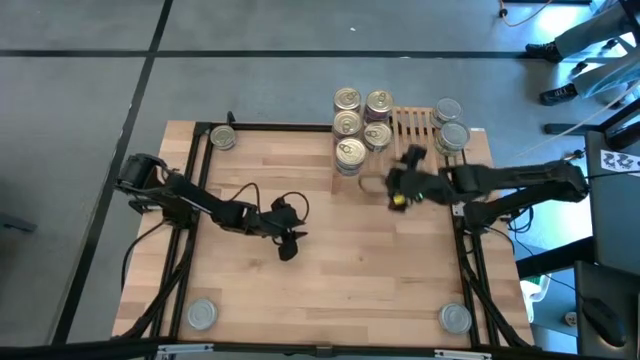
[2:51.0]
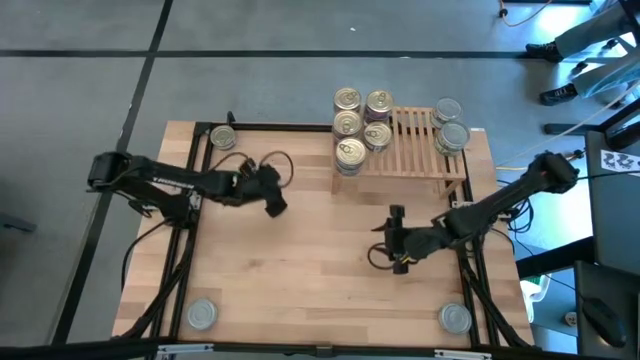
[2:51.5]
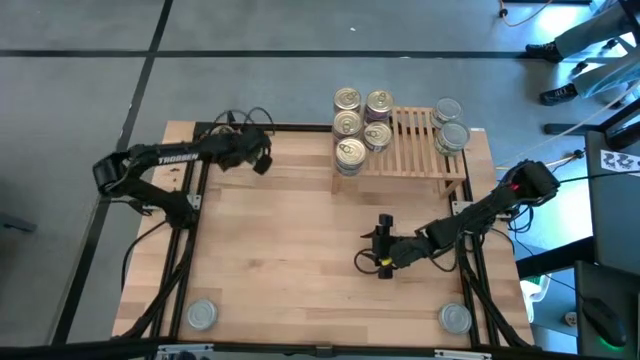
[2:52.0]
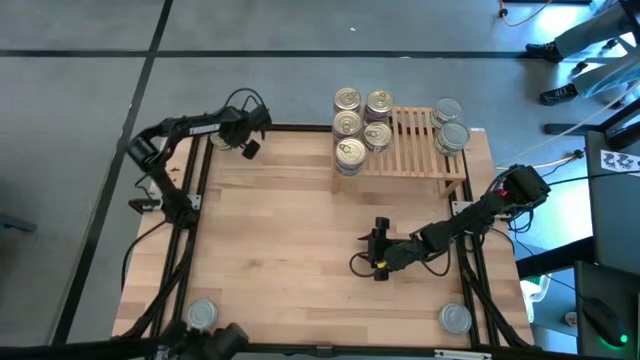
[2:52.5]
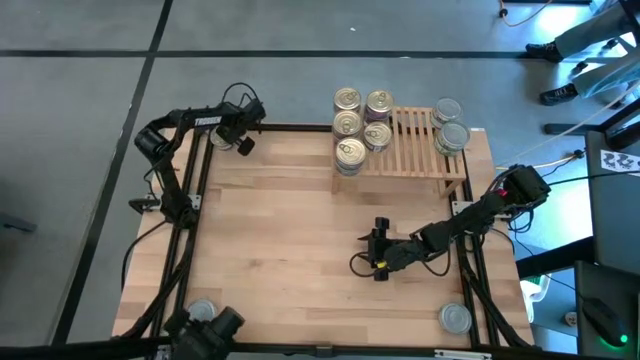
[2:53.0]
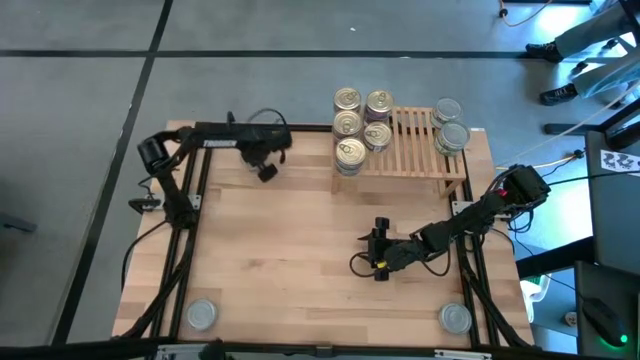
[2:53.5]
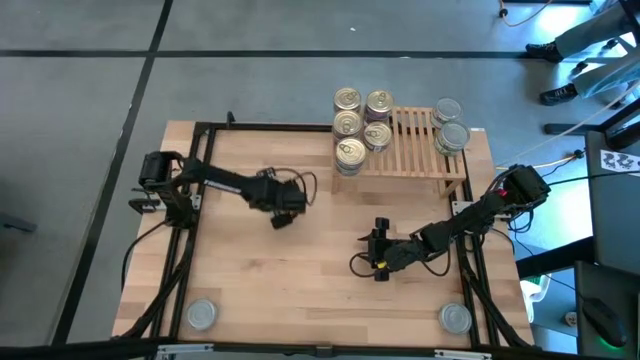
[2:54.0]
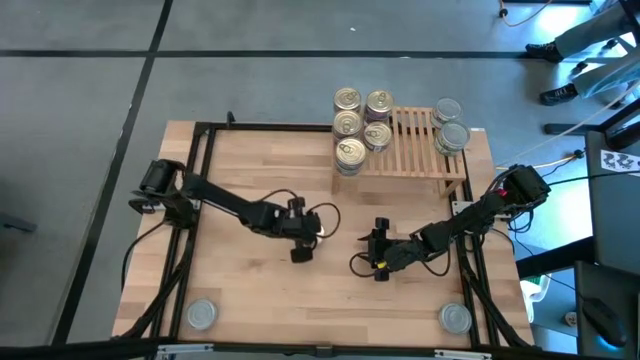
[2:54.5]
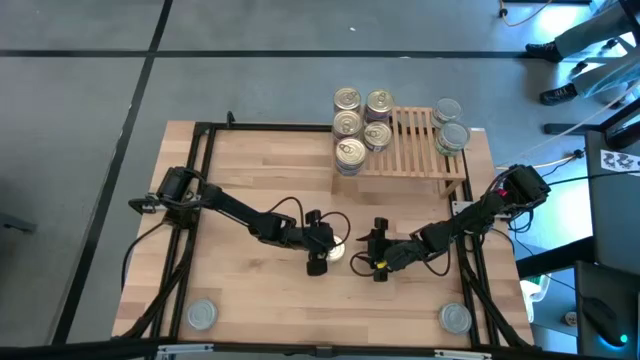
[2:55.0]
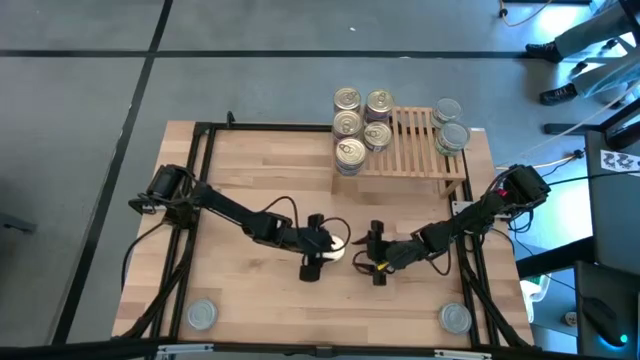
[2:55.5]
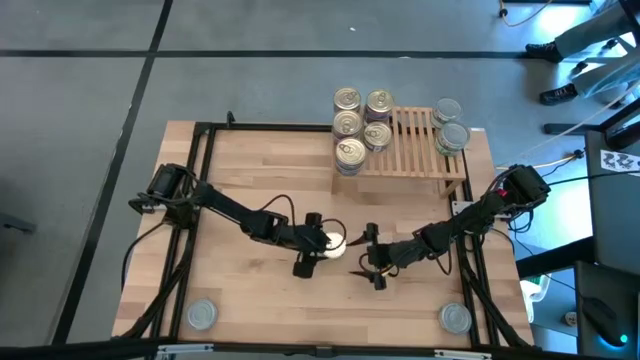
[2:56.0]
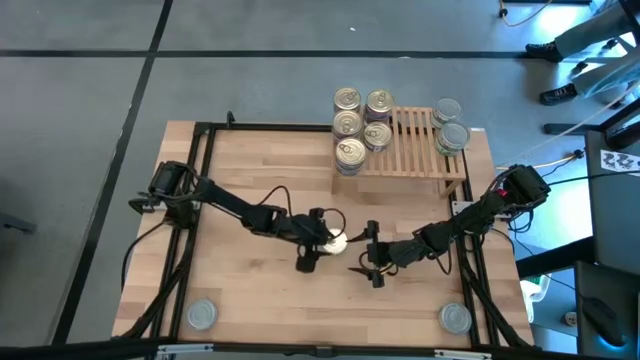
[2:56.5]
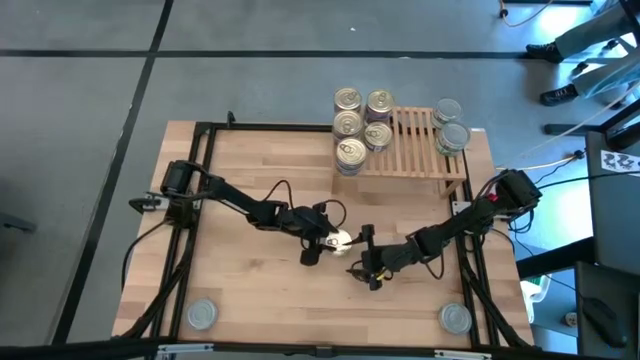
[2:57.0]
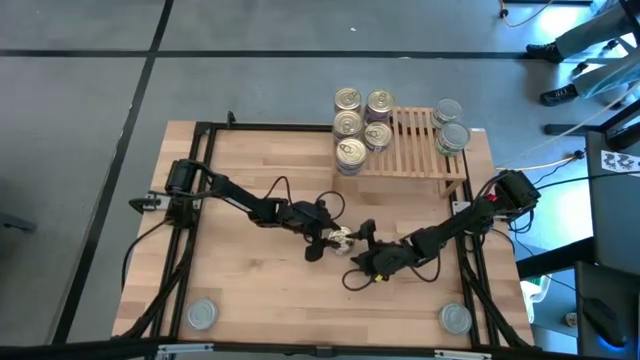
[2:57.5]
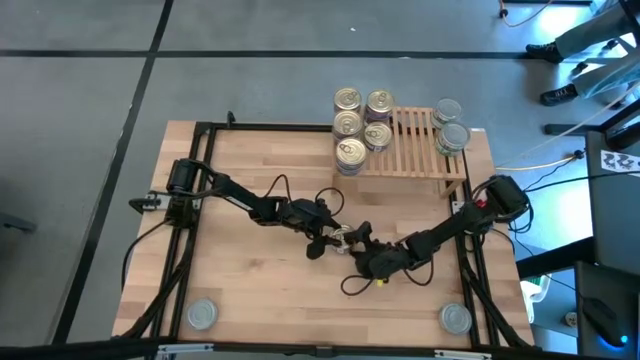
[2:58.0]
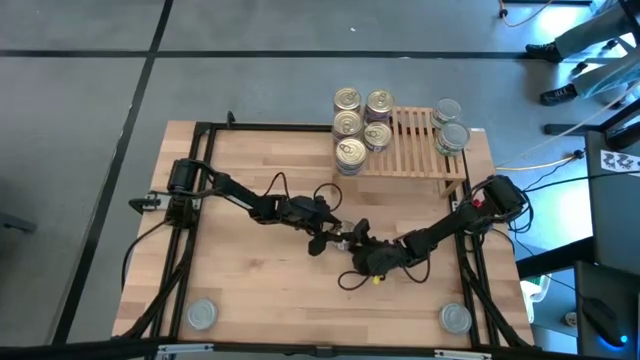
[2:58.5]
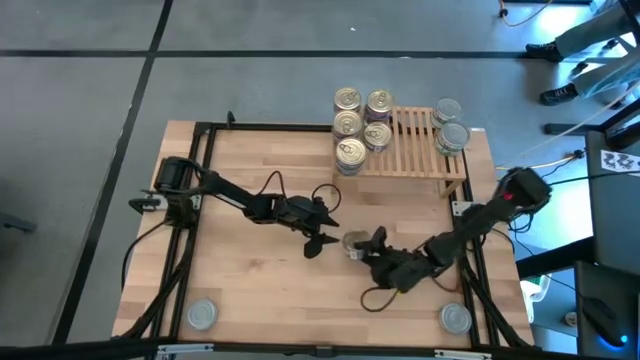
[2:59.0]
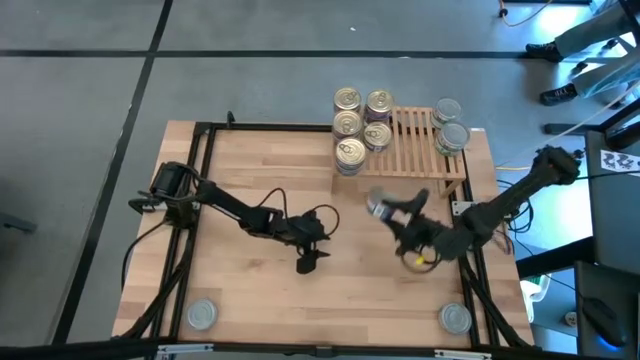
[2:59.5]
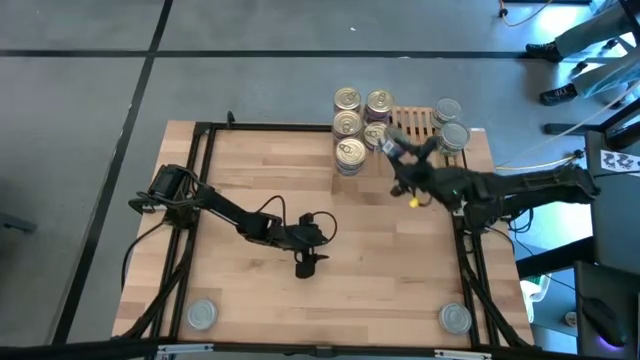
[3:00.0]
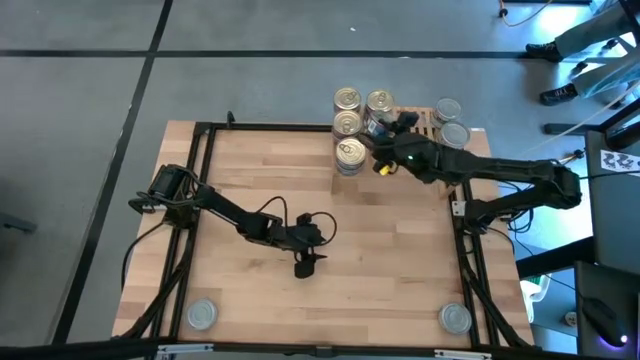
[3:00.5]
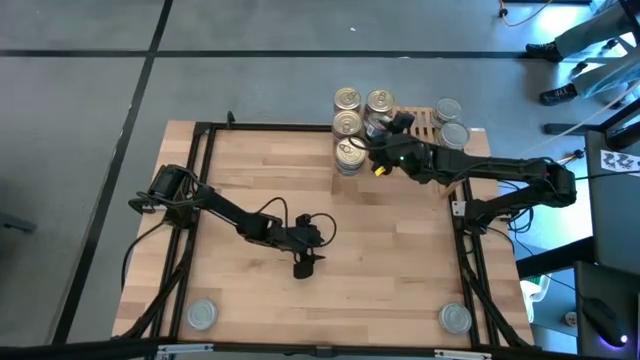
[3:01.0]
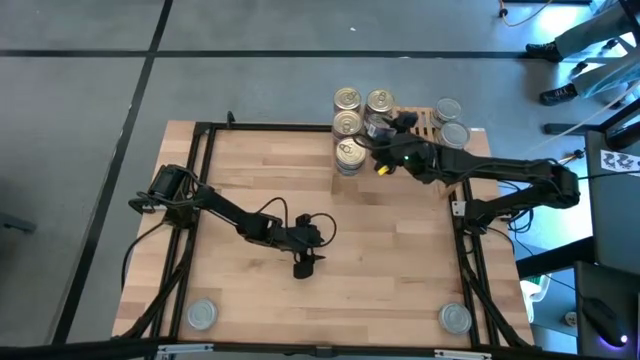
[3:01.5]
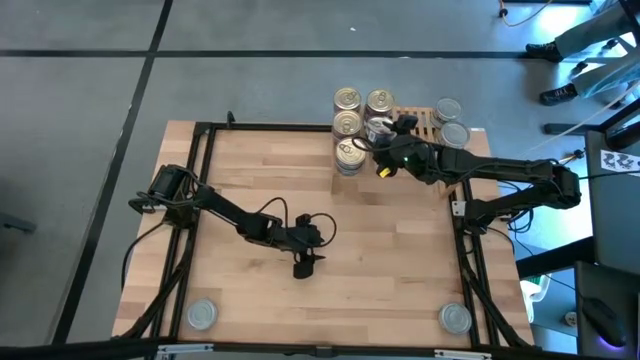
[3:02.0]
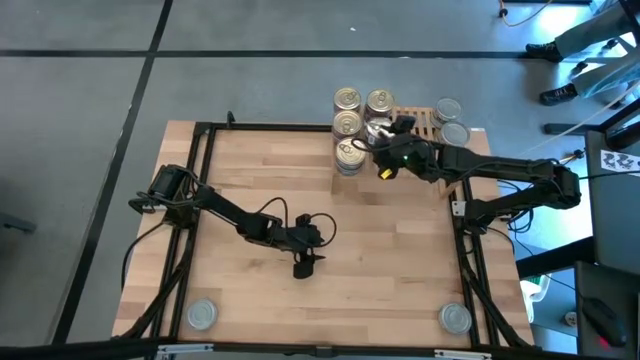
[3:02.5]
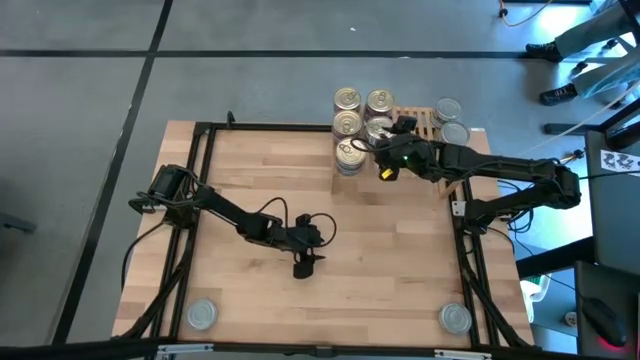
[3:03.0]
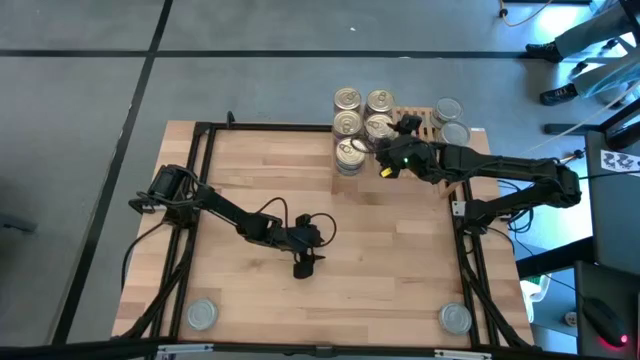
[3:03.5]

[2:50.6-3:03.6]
Task: Stack canned seafood by type on shelf
Stack the blue-pink tuna can on top of the blue-pink tuna can on the shelf

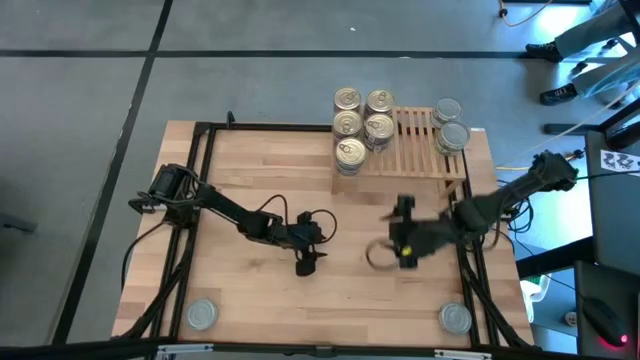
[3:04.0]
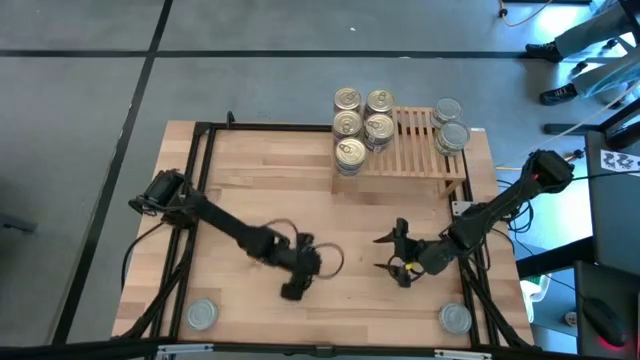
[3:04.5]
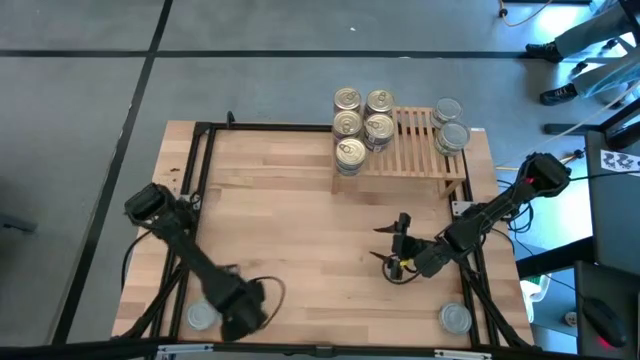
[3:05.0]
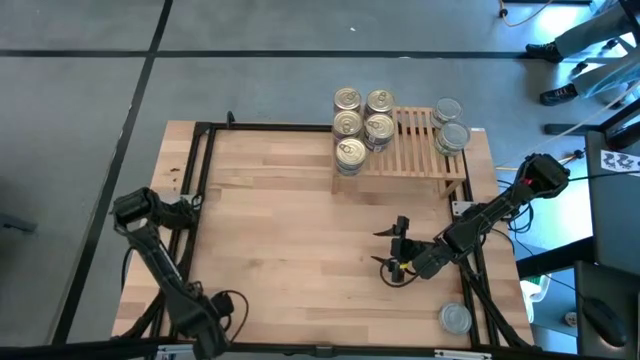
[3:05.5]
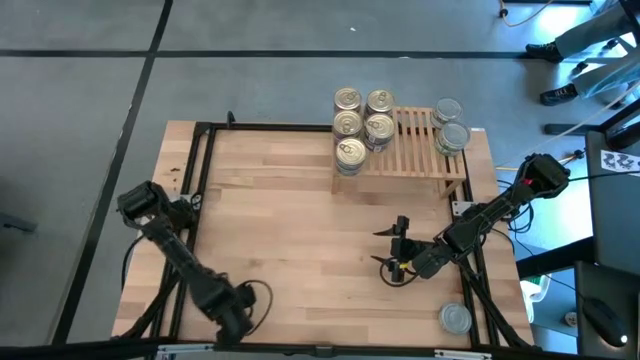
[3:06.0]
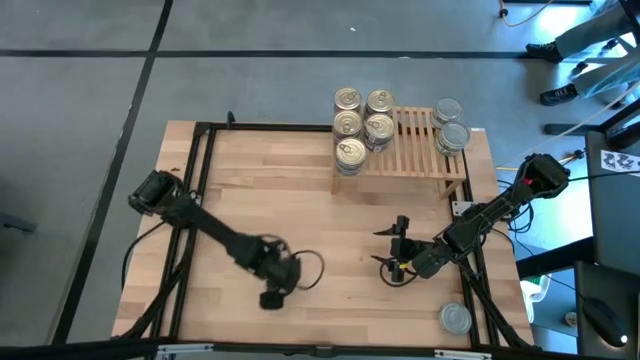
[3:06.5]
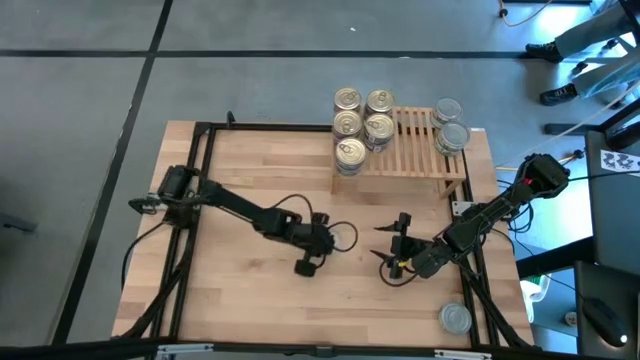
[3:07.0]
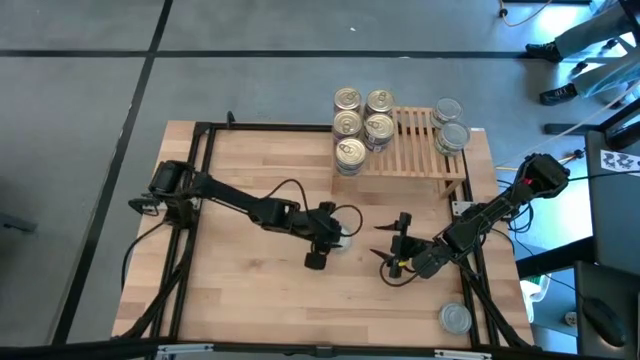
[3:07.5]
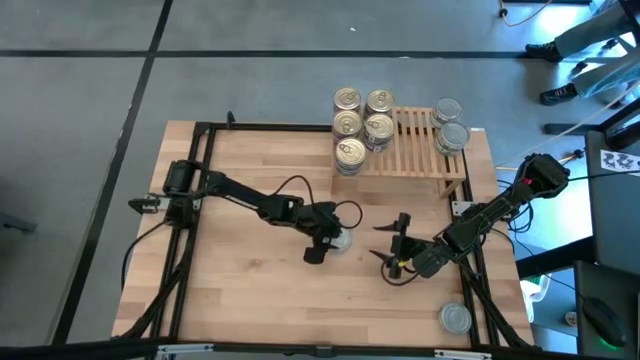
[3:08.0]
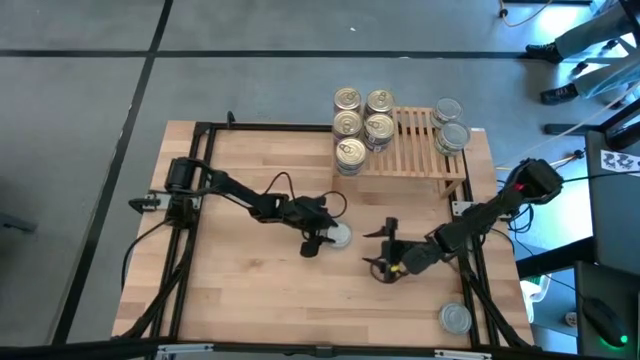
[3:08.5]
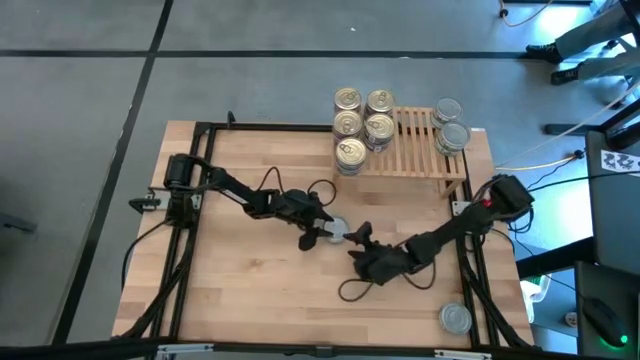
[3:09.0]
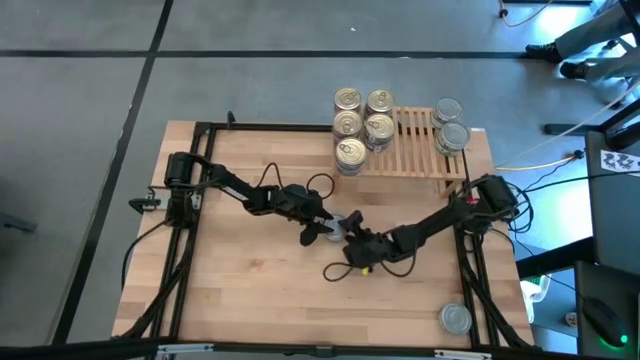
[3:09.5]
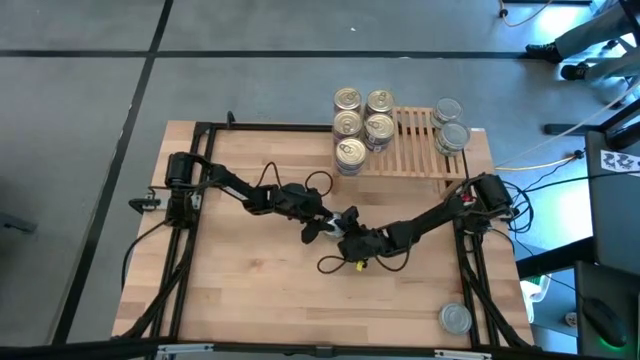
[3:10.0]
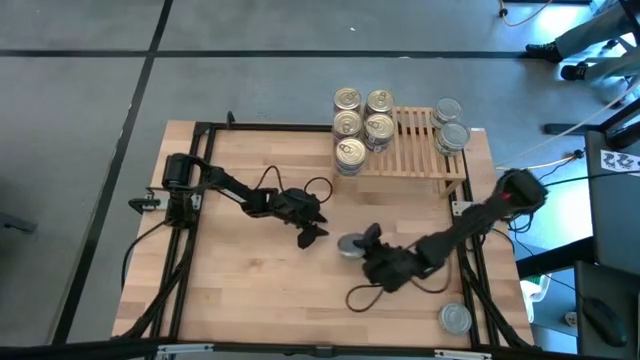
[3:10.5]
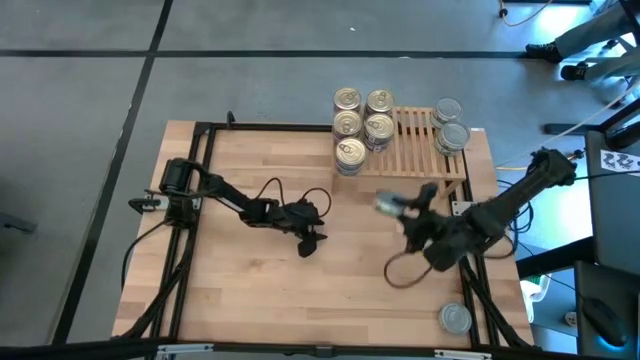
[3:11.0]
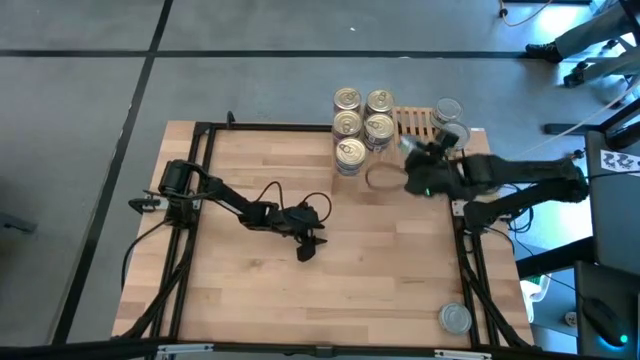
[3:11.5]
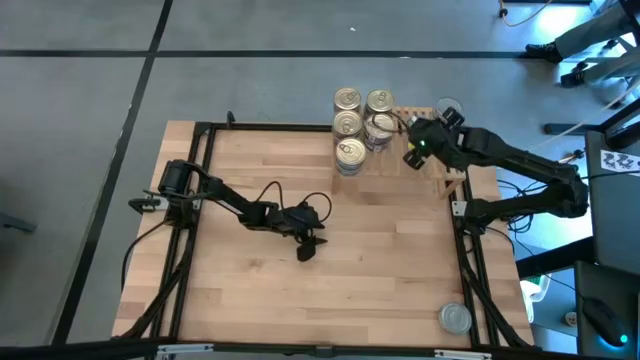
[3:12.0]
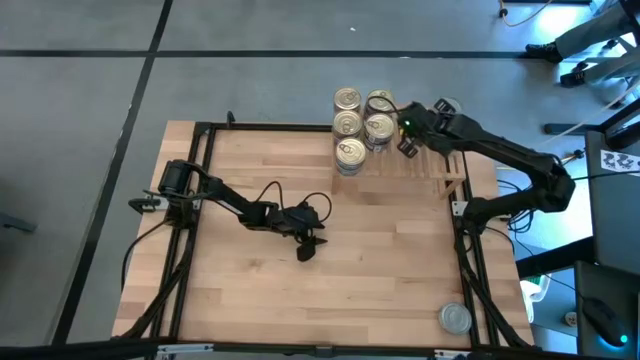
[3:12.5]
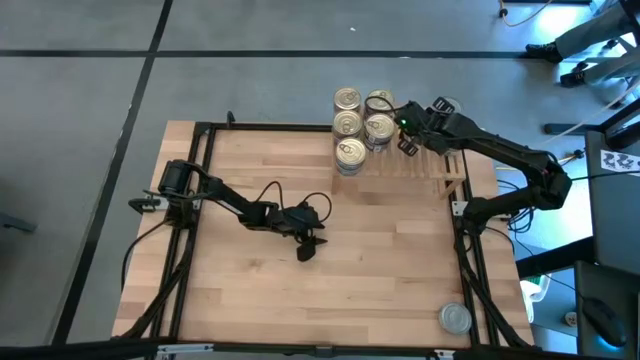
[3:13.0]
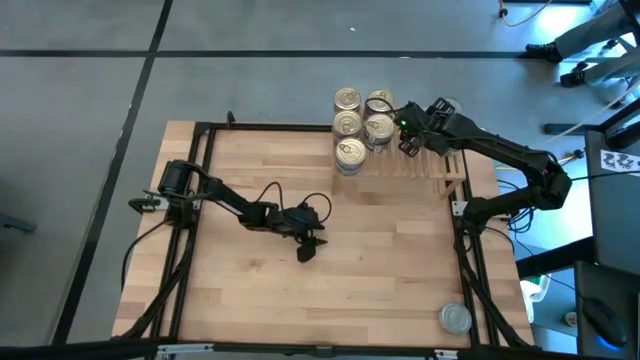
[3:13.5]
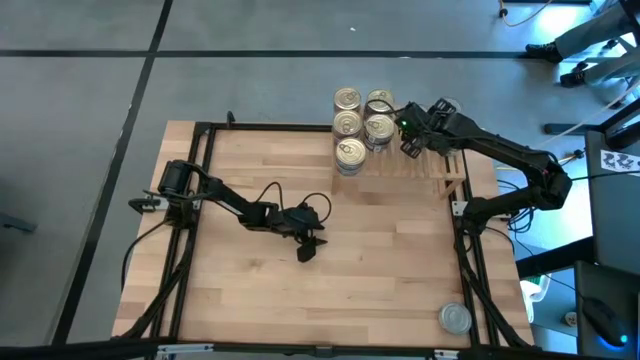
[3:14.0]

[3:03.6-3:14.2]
Put the green tuna can on the shelf
